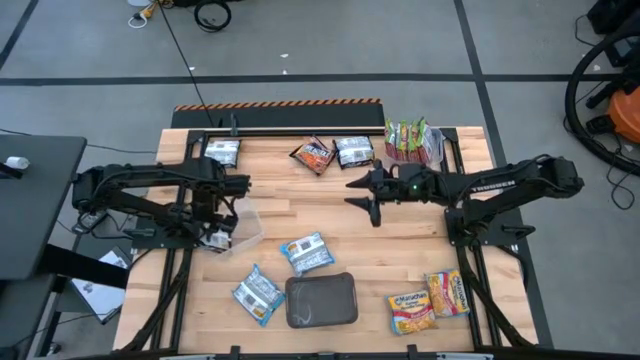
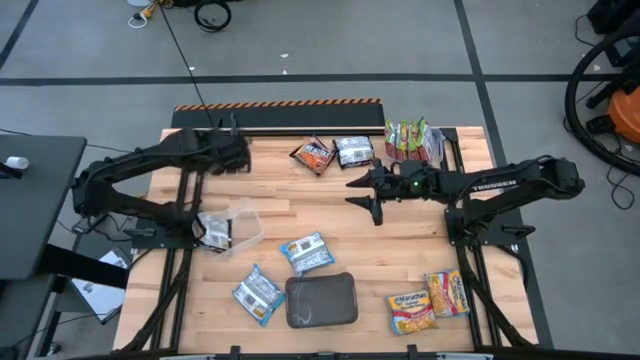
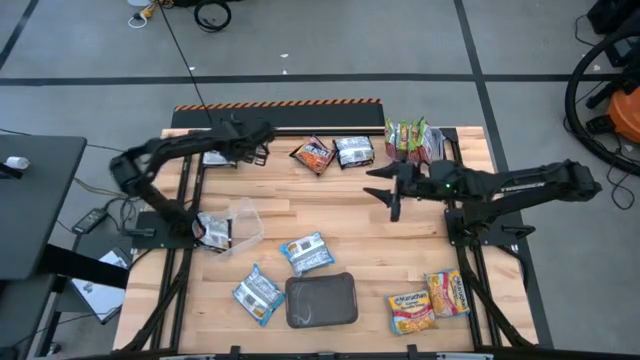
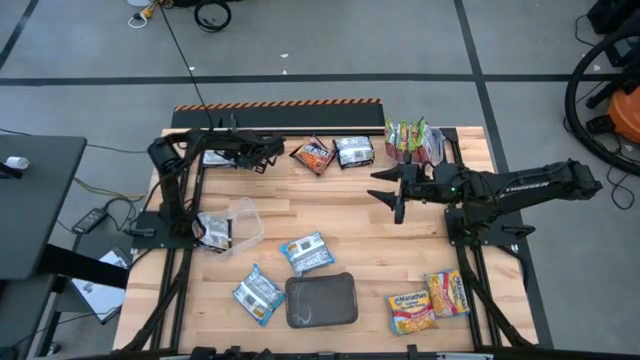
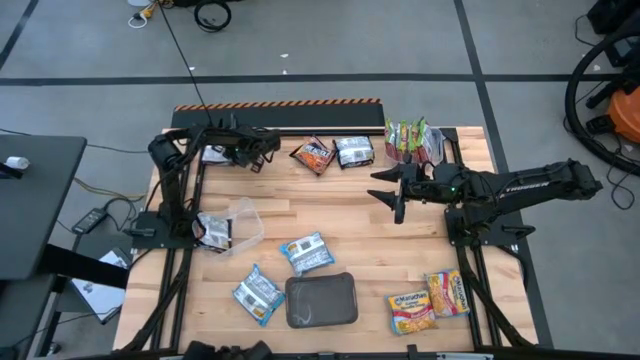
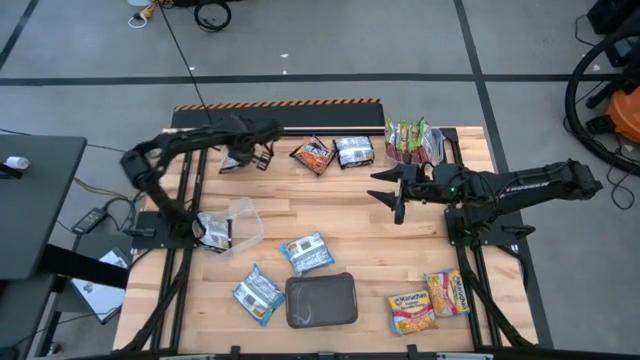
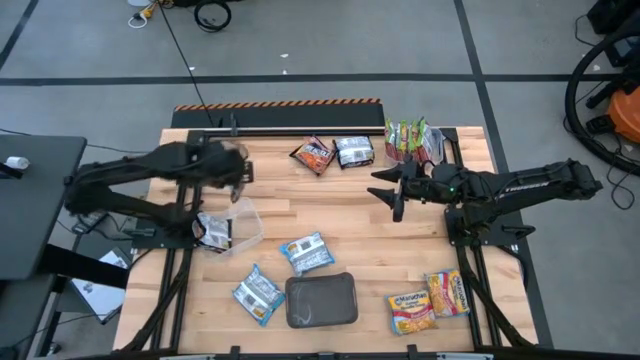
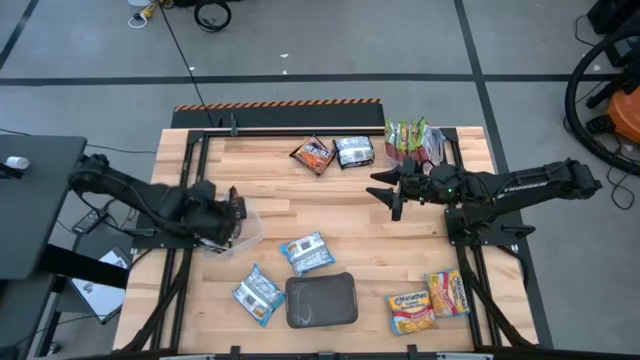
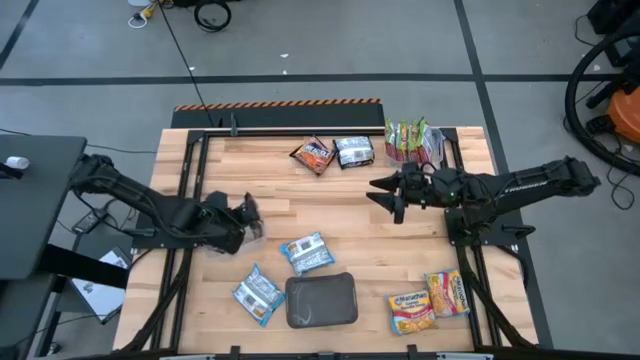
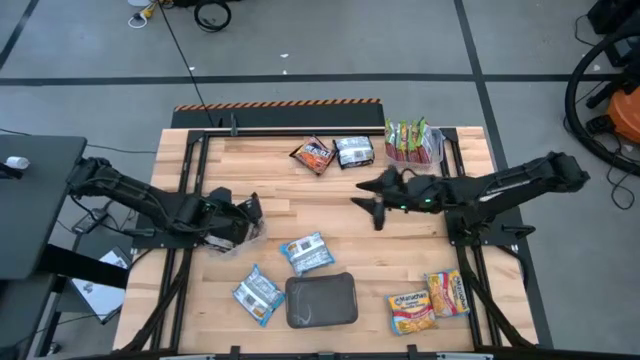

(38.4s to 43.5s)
Task: Sort Maruchan noodles
Put the black noodle pack into the bottom transparent bin

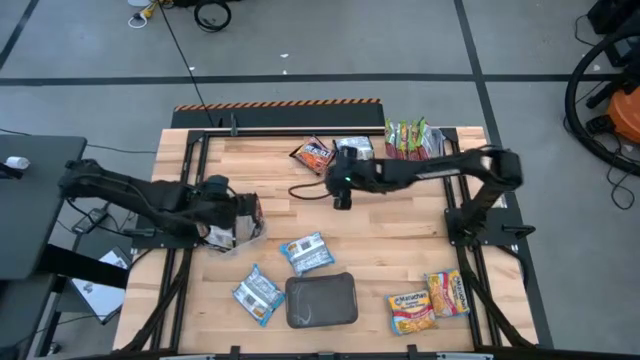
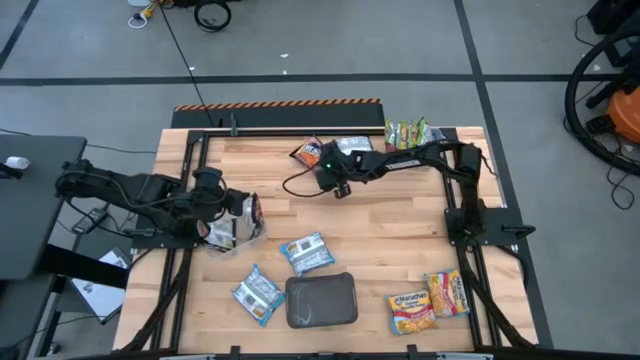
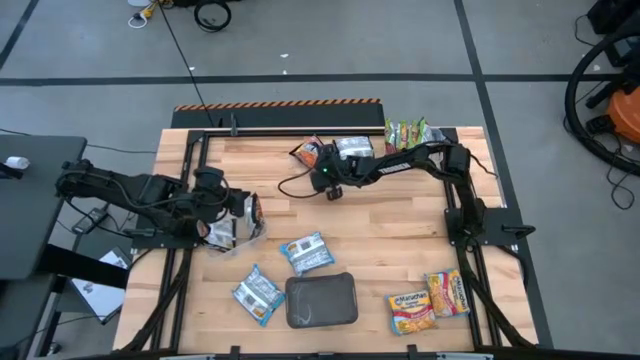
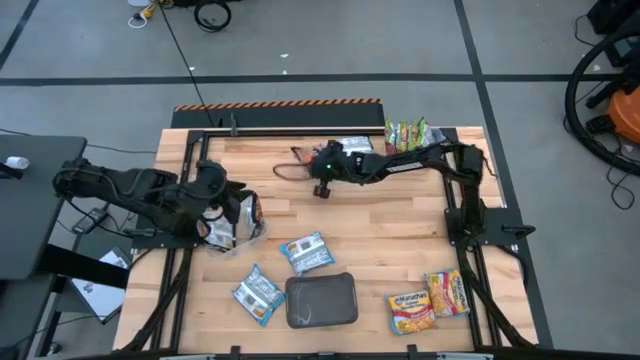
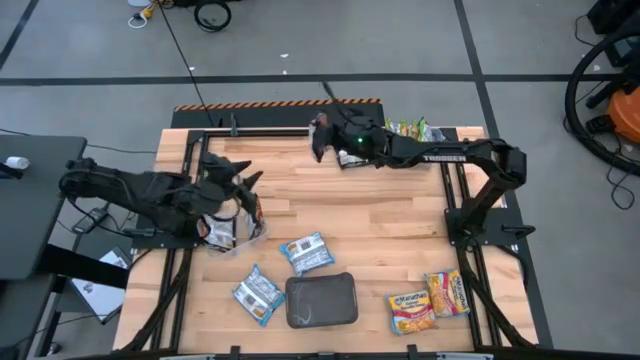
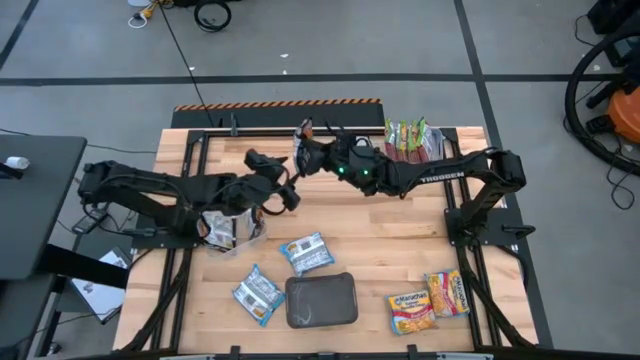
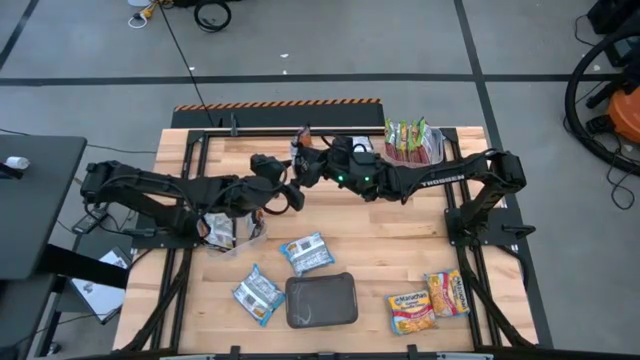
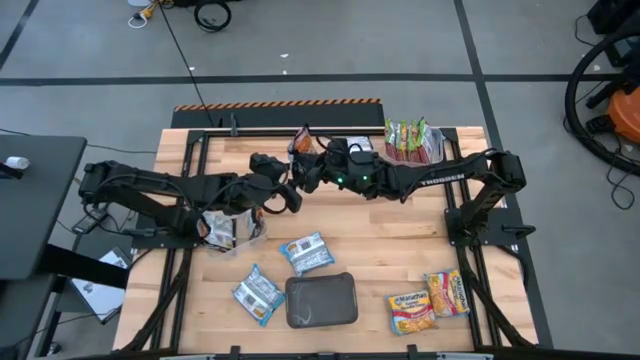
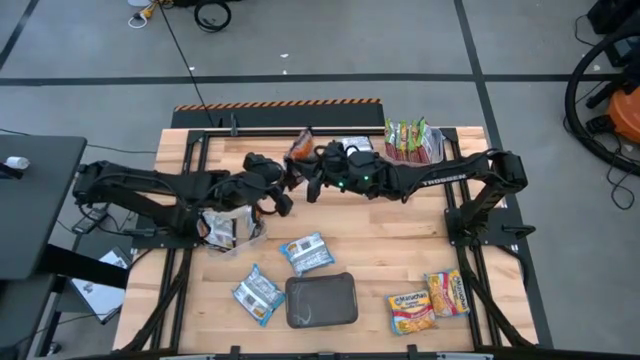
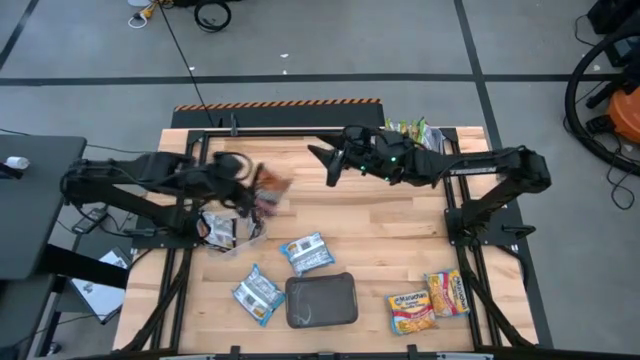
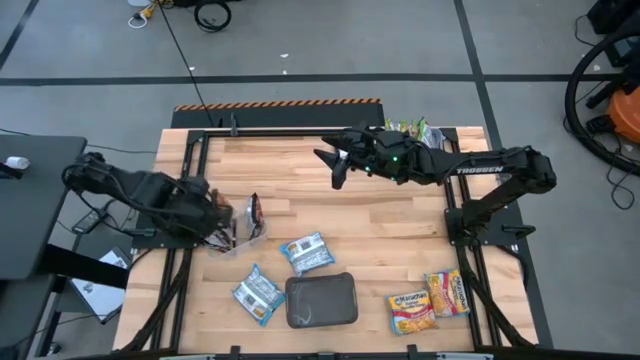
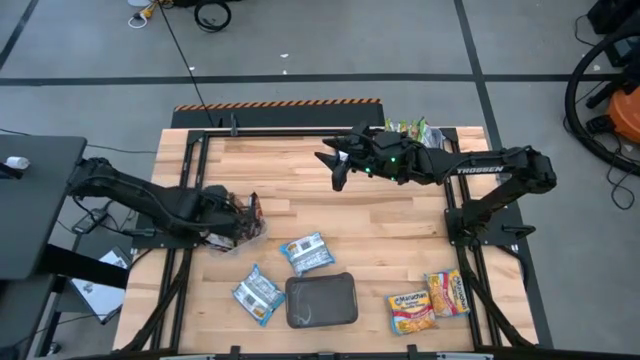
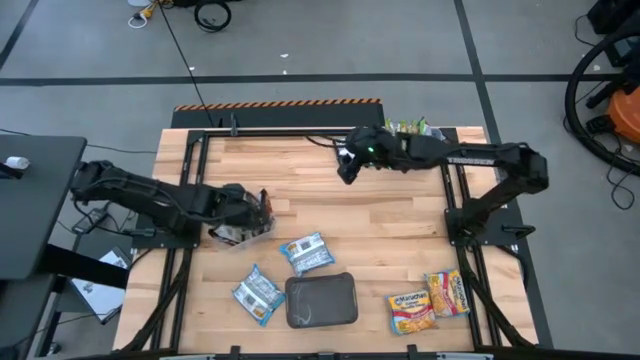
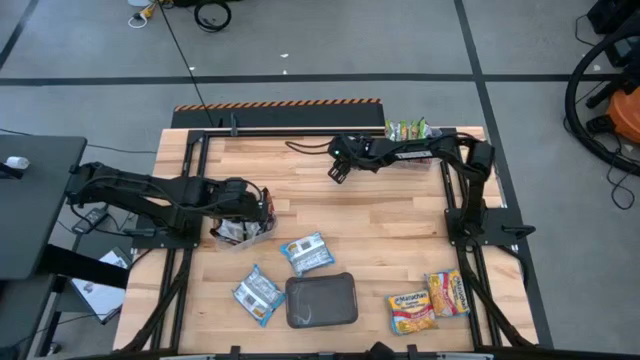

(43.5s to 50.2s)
Put the black noodle pack into the bottom transparent bin

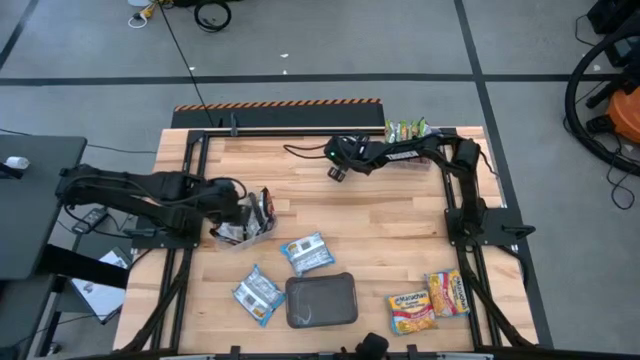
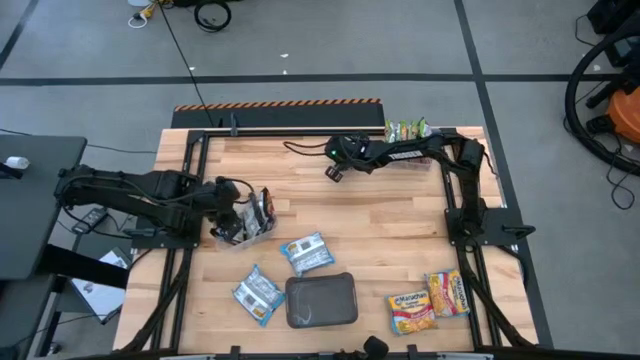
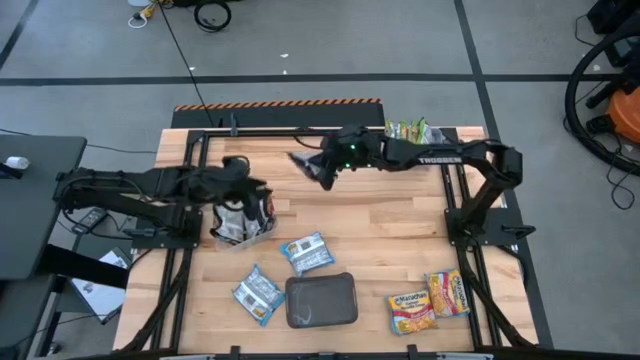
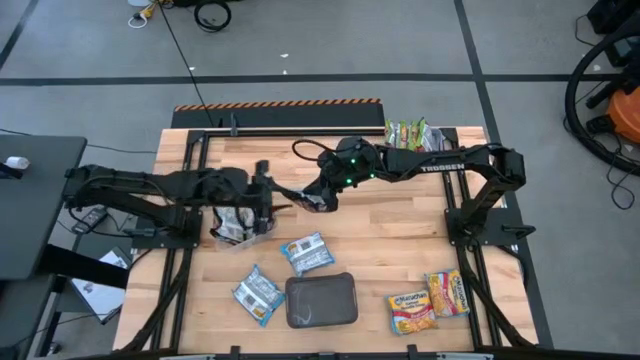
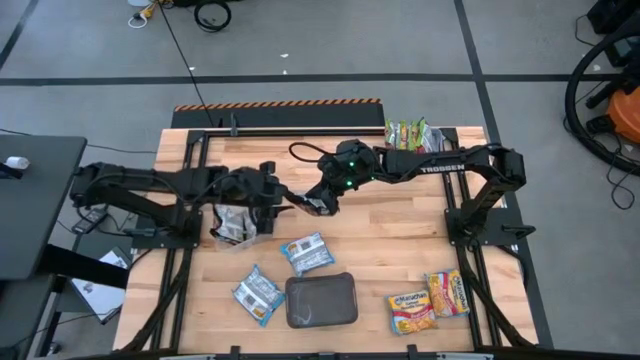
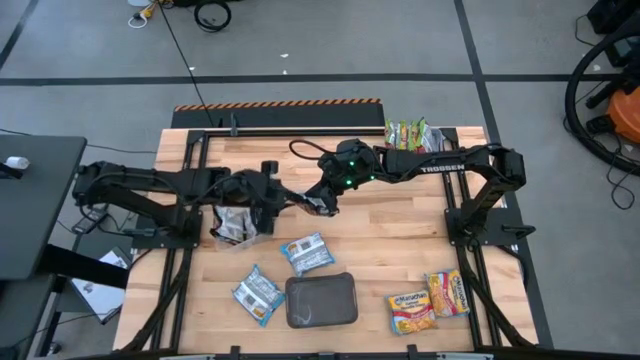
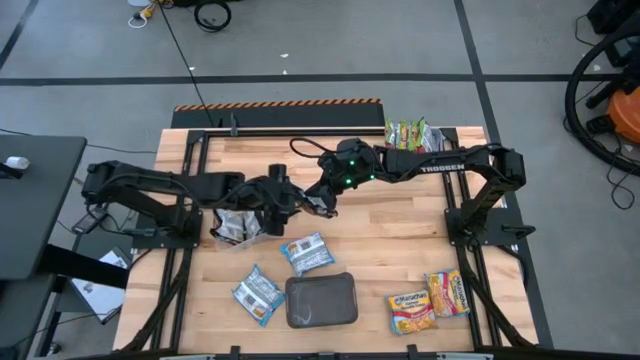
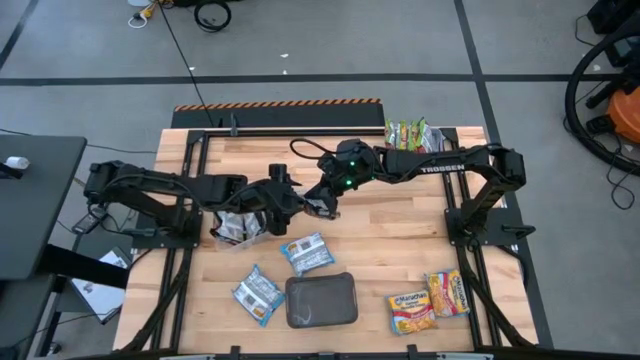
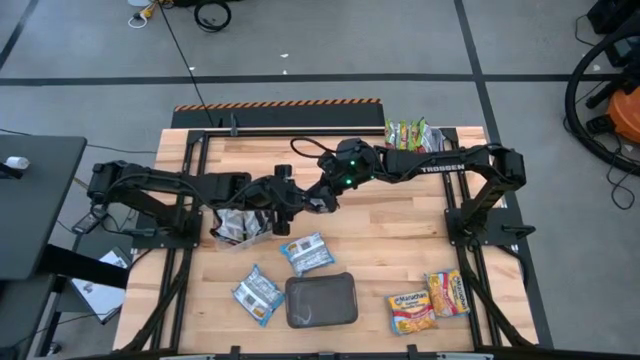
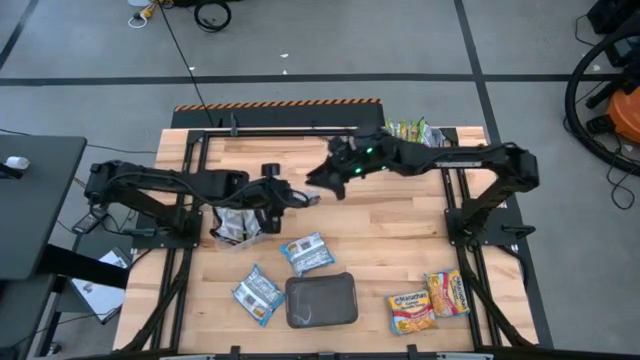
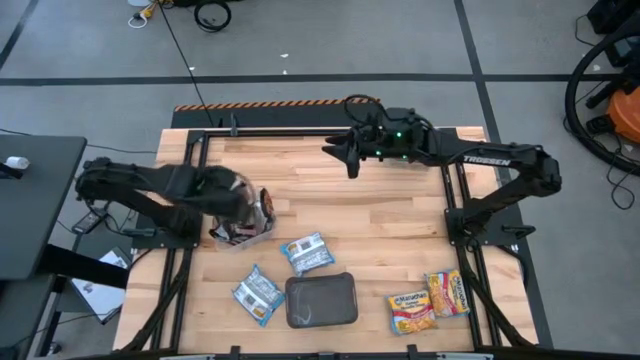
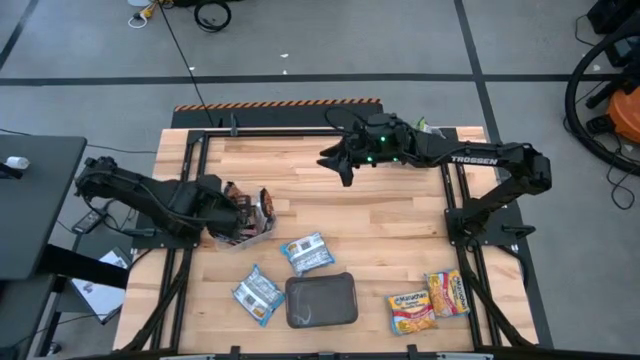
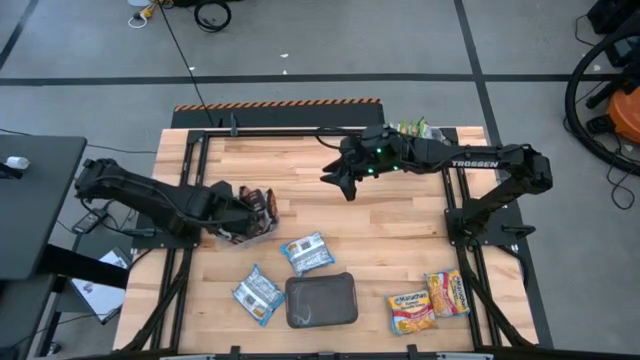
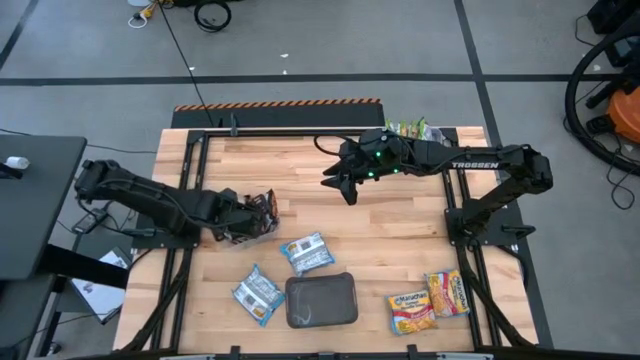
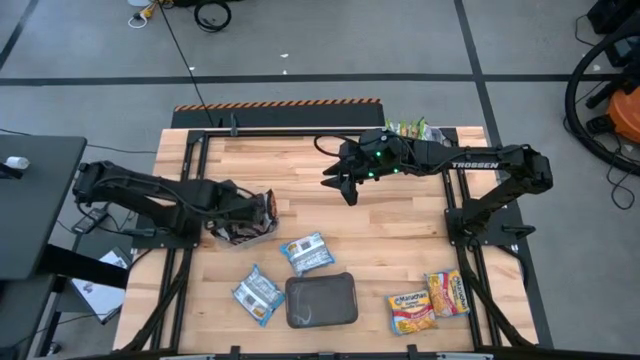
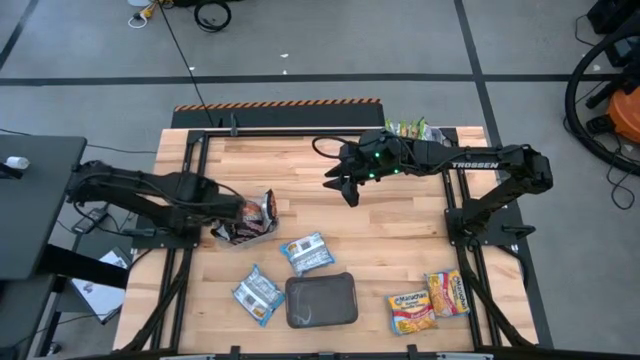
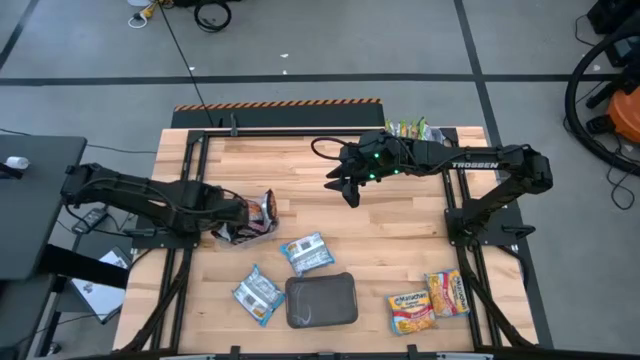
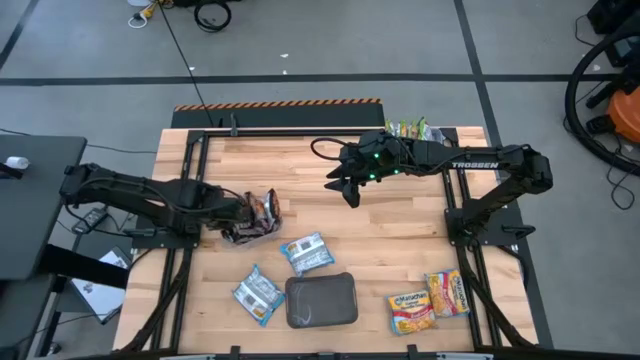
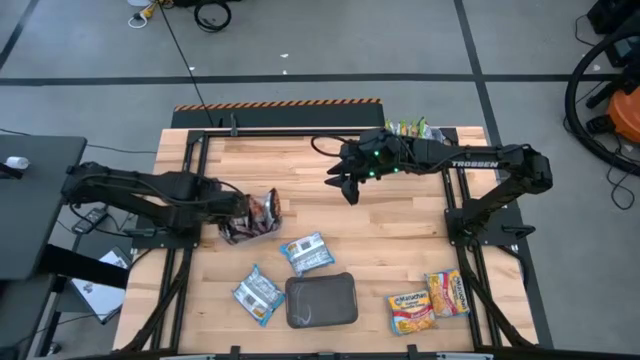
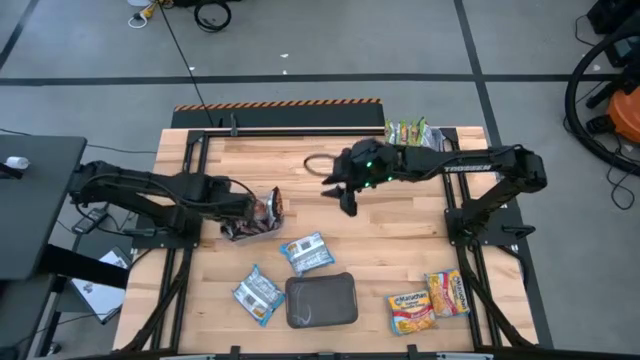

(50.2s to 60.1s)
Put the black noodle pack into the bottom transparent bin

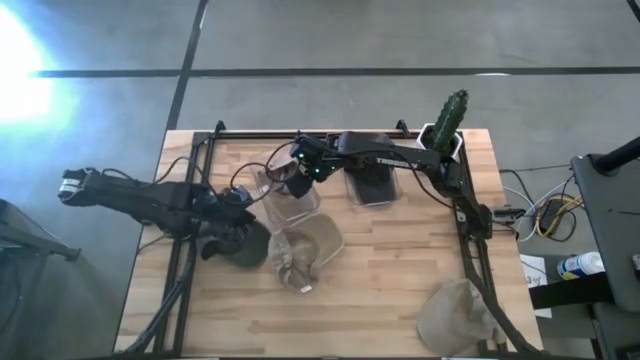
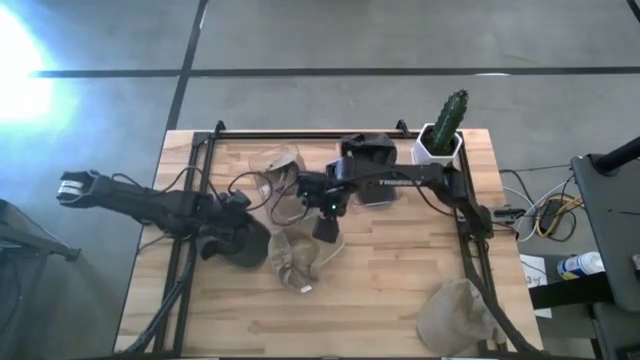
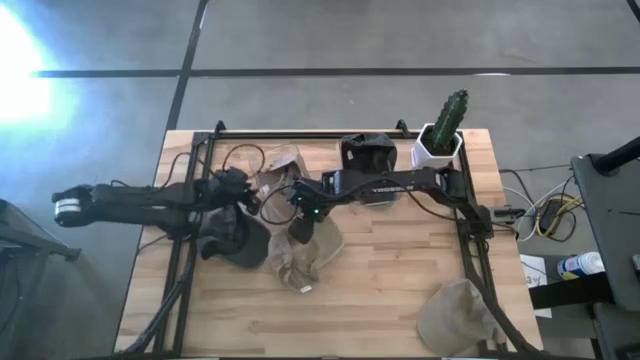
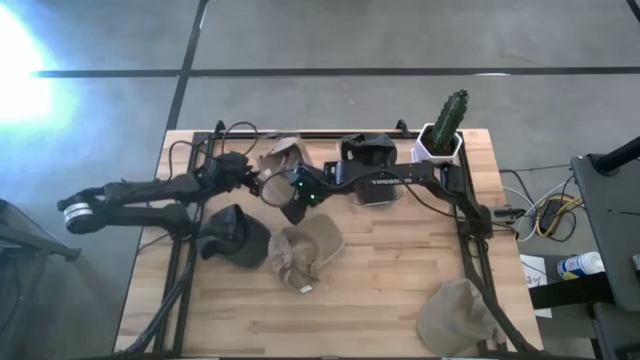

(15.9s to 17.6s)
Task: Pick & Place hat
Adjust the left transparent bin
